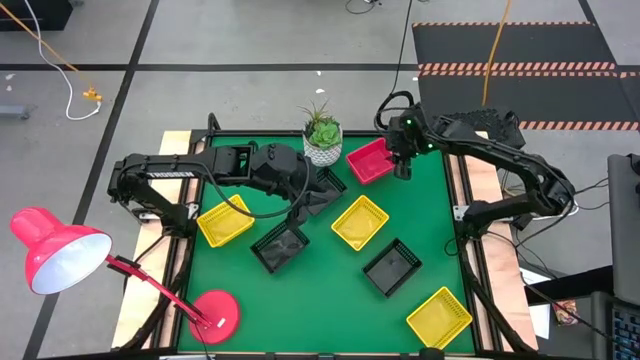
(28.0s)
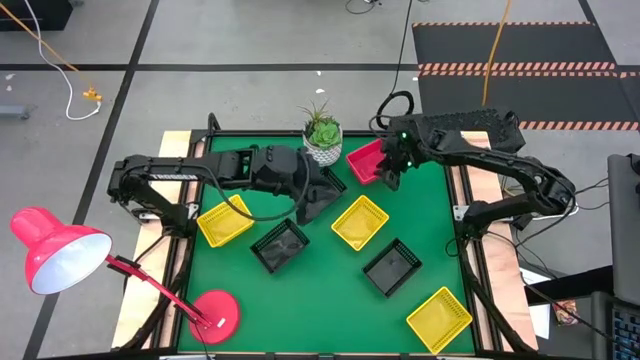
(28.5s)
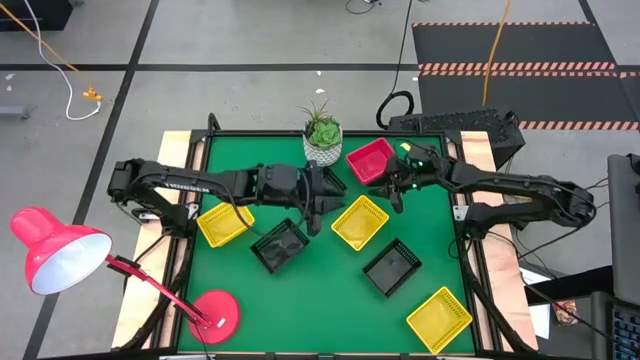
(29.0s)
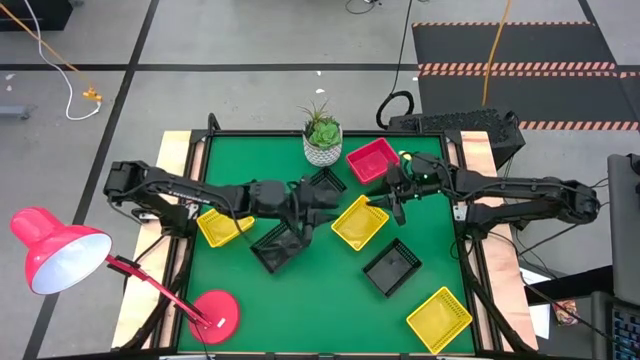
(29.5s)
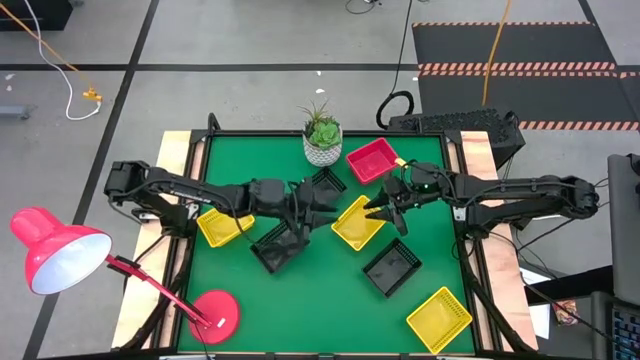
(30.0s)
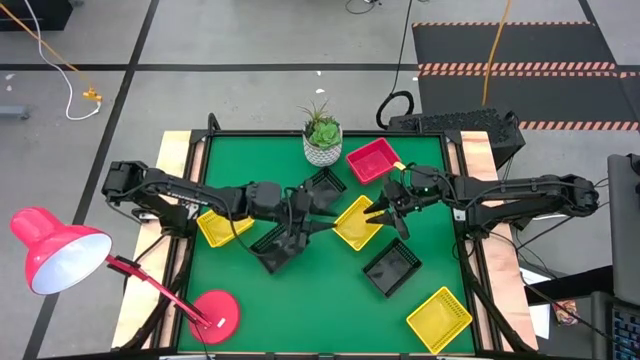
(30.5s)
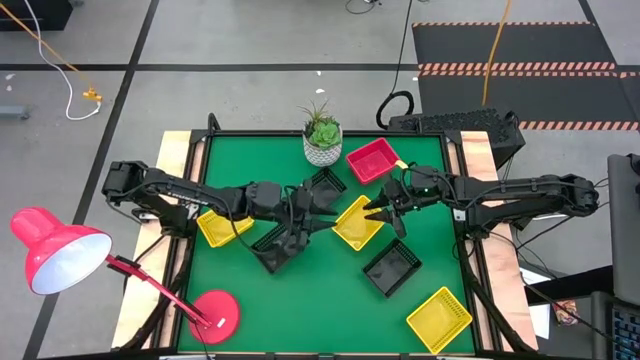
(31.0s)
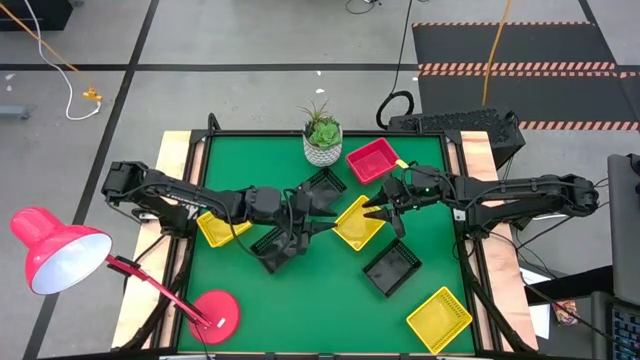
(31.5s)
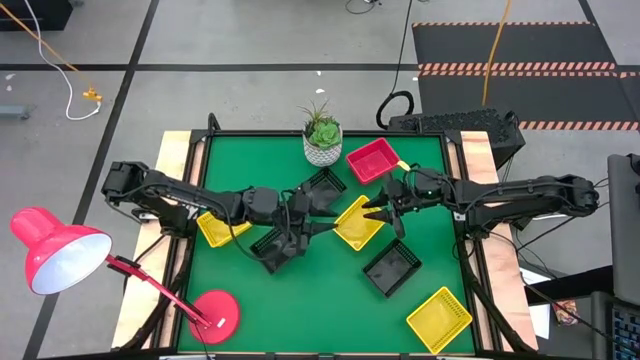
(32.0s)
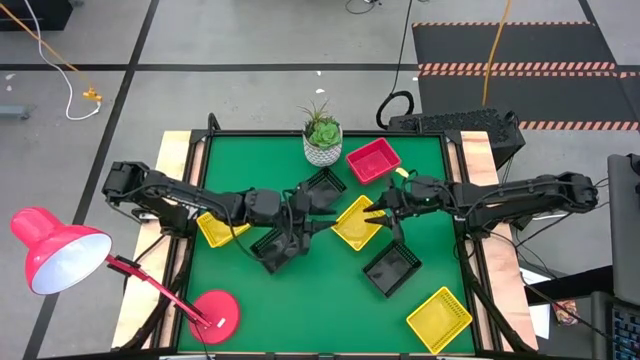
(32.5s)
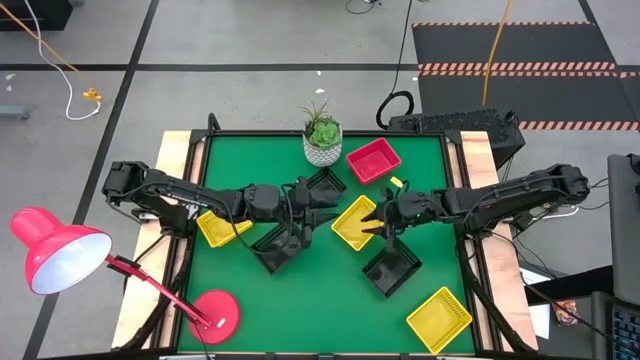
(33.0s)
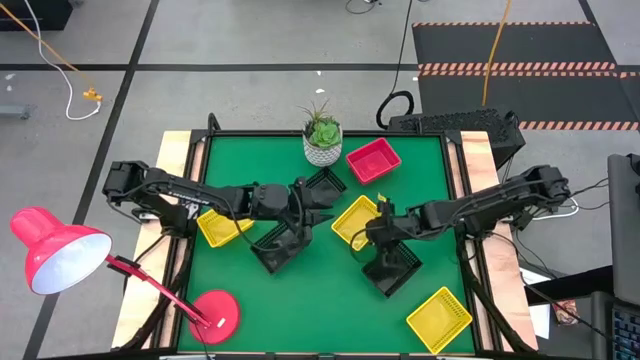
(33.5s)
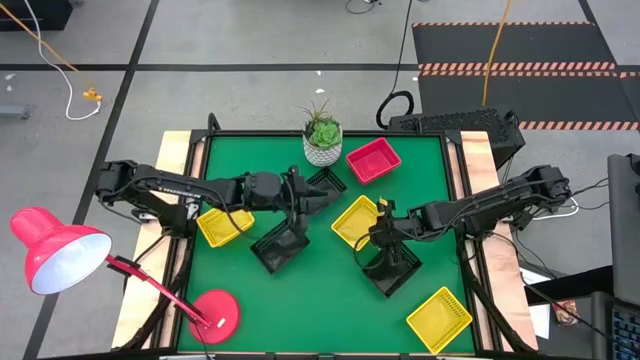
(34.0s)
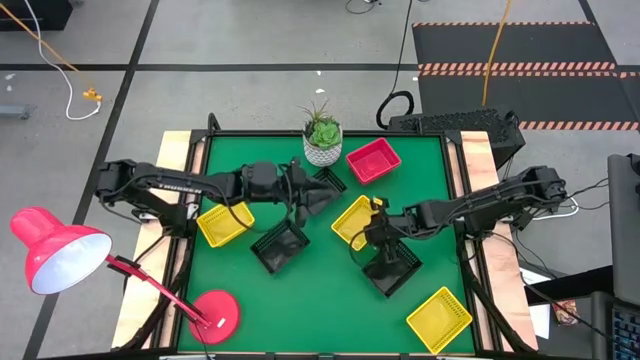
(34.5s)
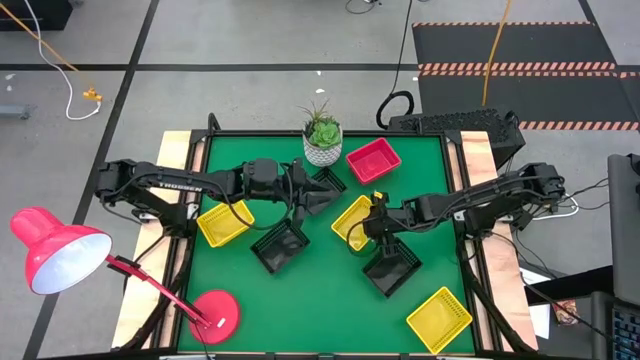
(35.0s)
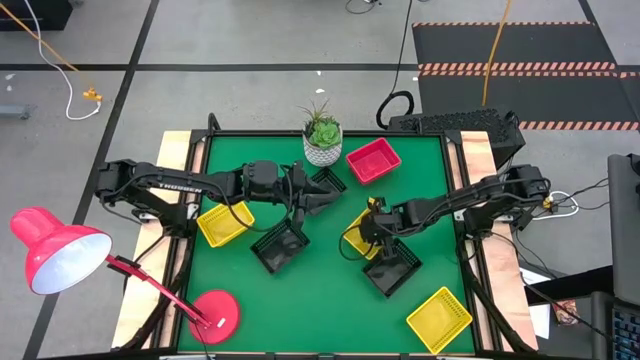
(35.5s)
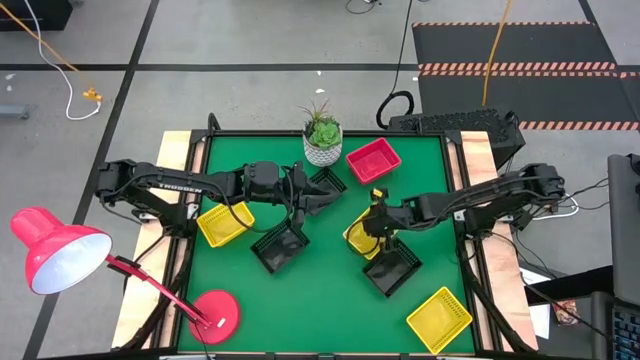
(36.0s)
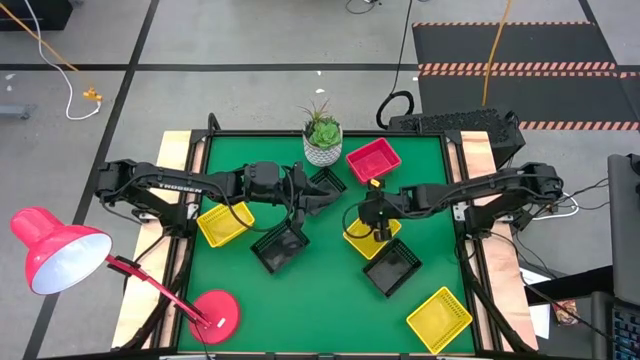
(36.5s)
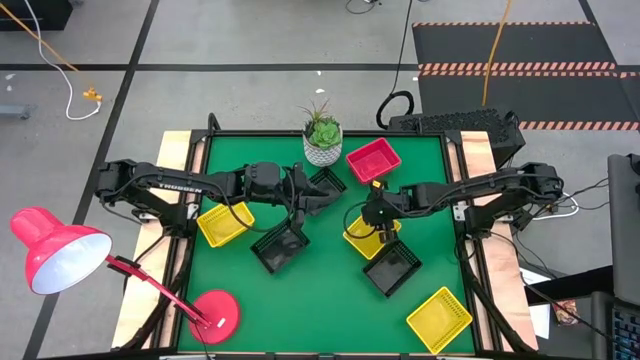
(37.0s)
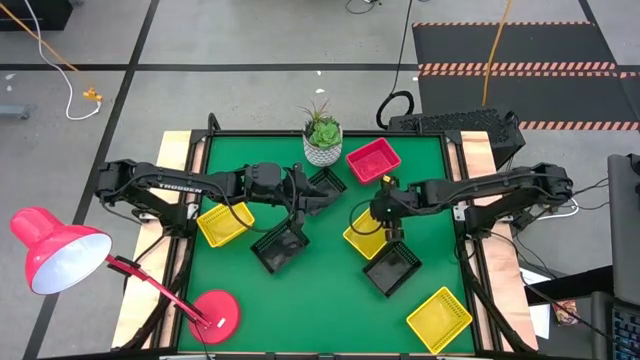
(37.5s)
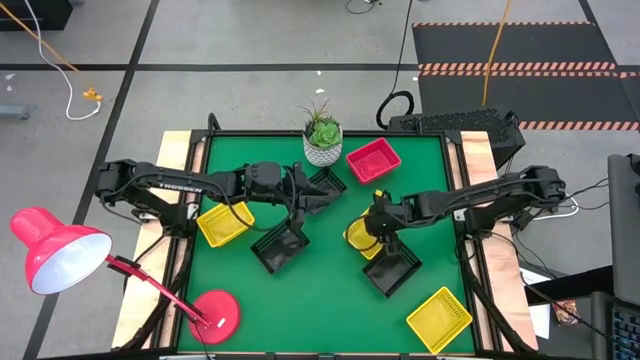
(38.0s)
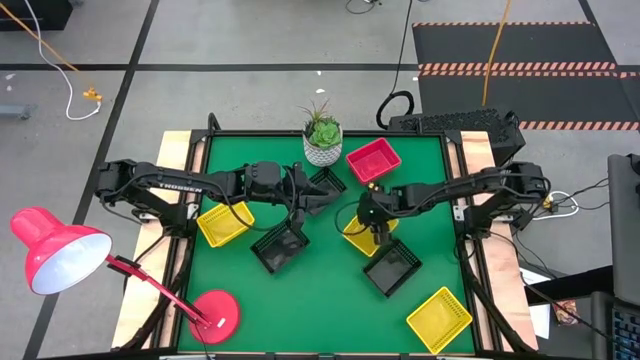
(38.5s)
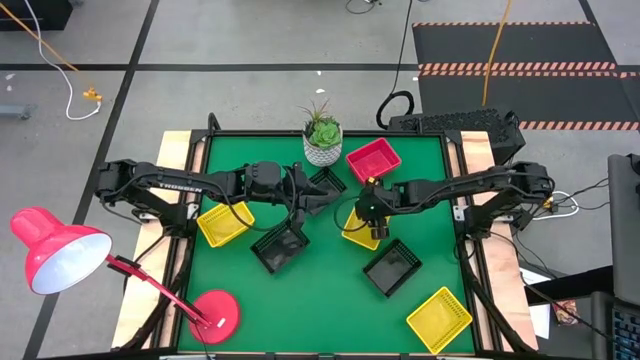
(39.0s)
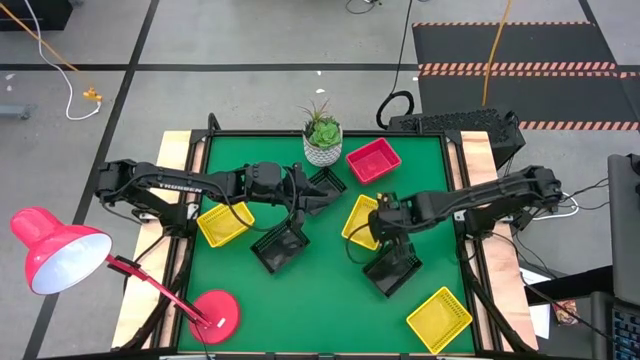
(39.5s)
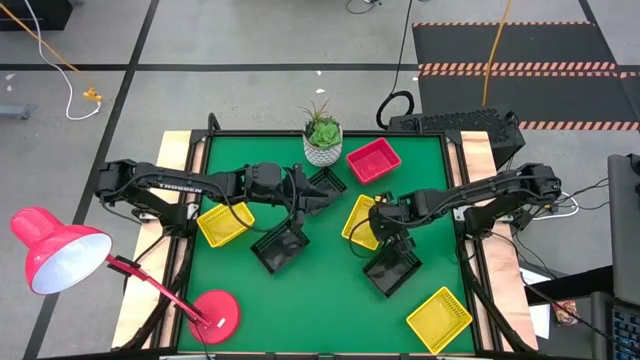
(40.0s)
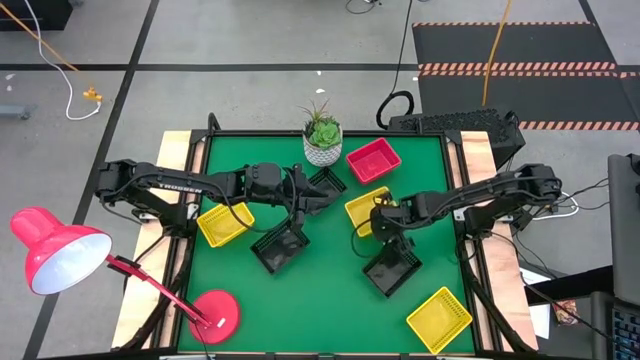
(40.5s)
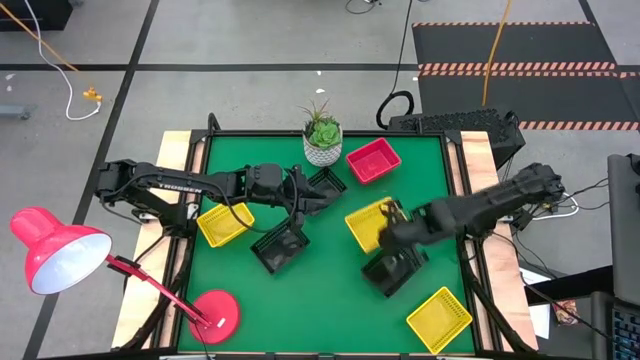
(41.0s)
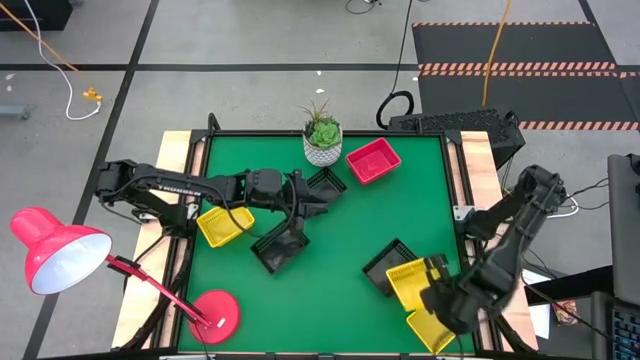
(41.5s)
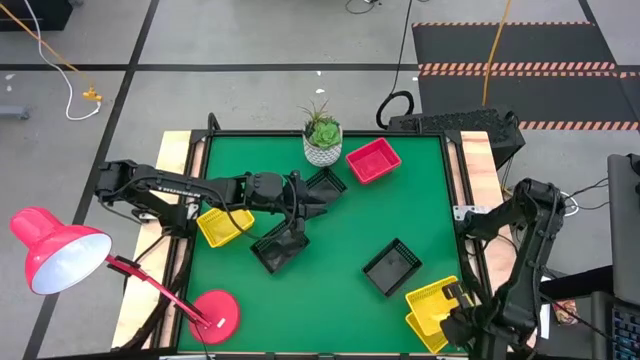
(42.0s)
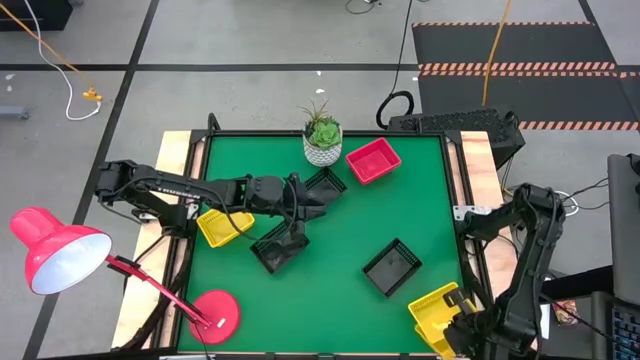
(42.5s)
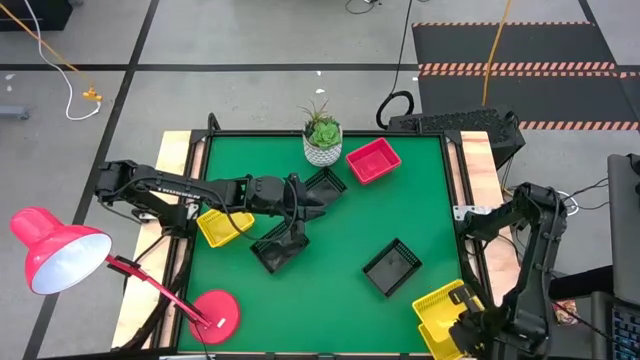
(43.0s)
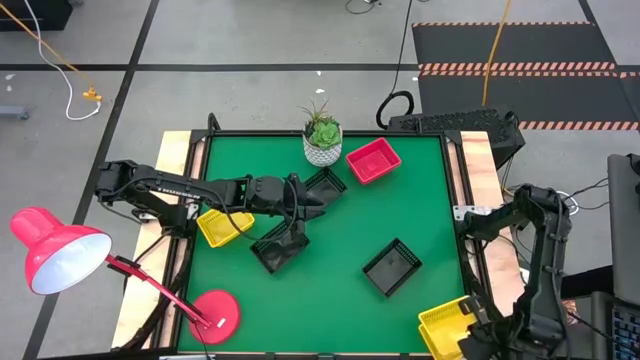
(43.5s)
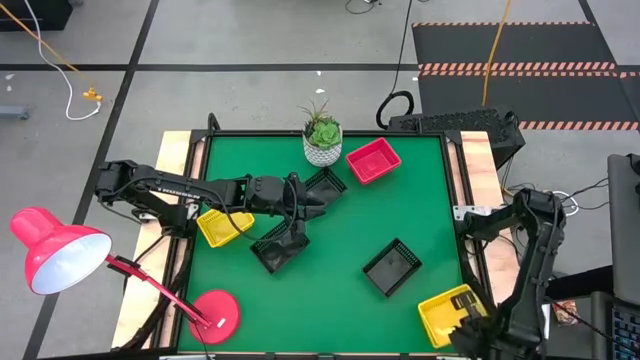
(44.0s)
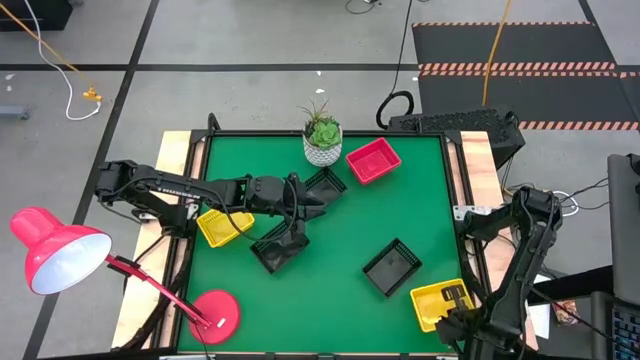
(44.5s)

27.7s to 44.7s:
Stack the top right yellow bin on the bottom right yellow bin

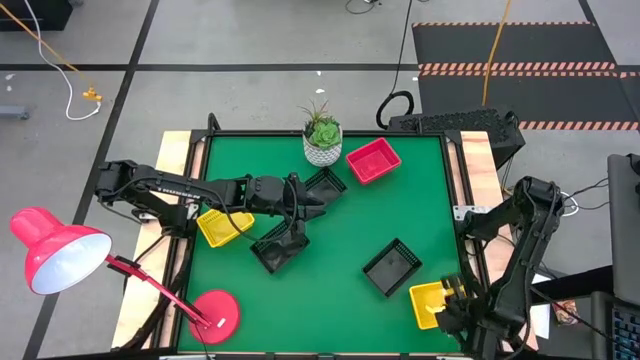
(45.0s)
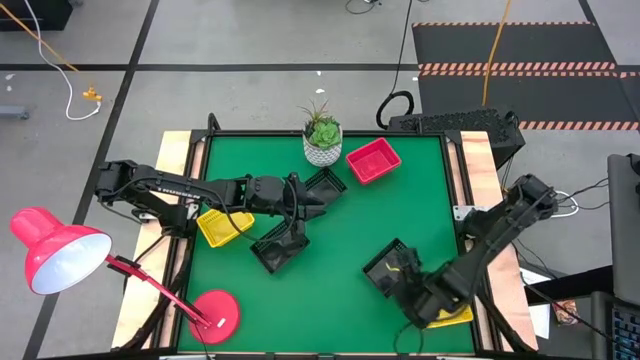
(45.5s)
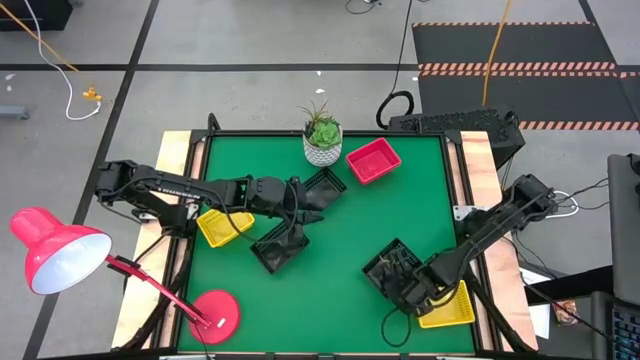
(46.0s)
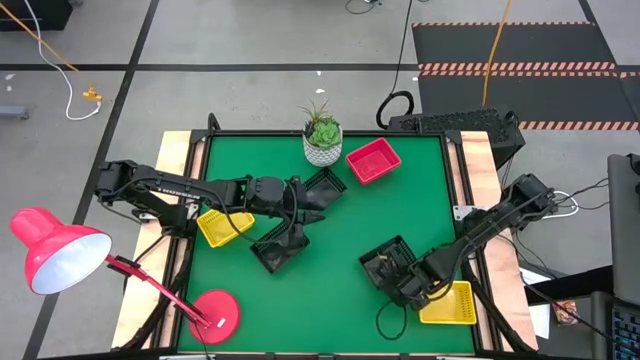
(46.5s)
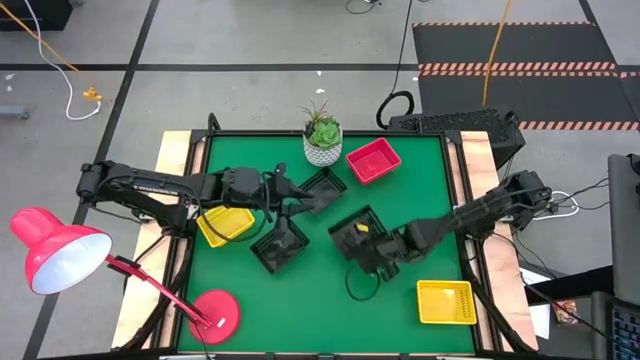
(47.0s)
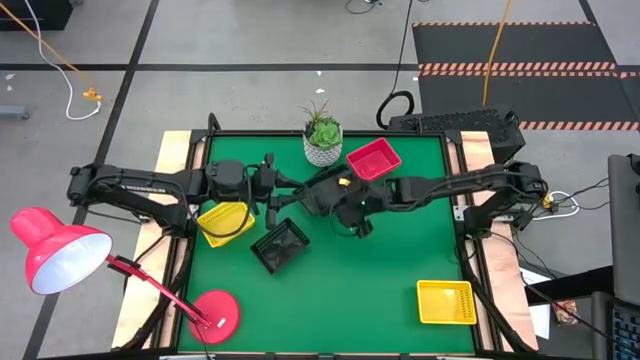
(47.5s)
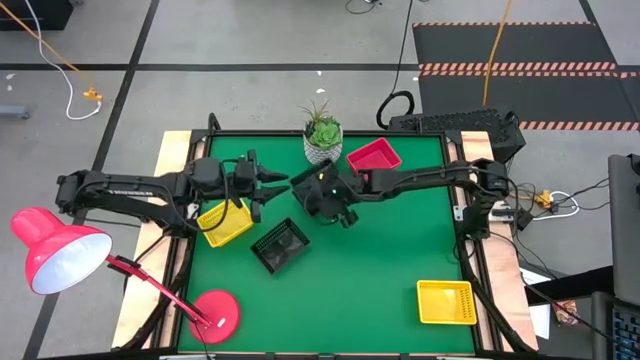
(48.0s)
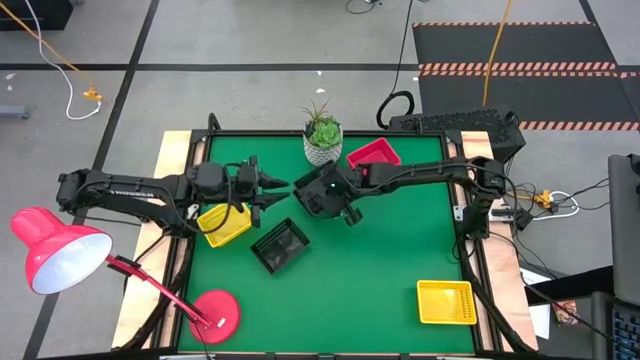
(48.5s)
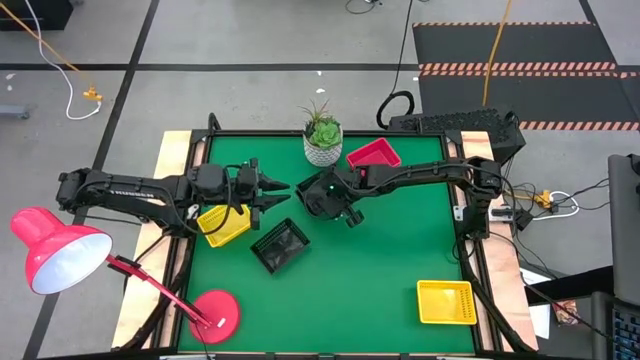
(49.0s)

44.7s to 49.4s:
Stack the bottom black bin on the top black bin
